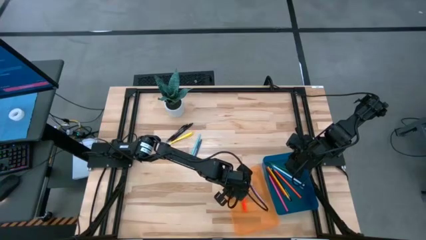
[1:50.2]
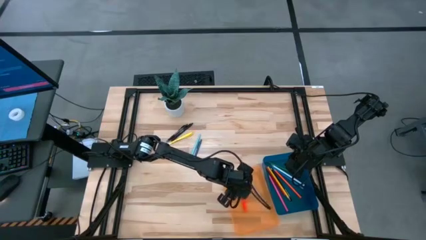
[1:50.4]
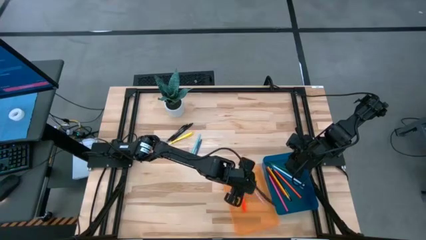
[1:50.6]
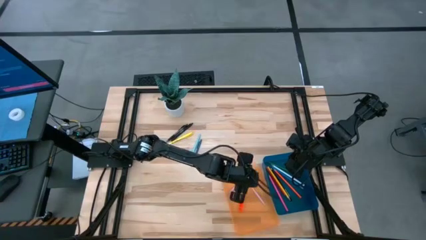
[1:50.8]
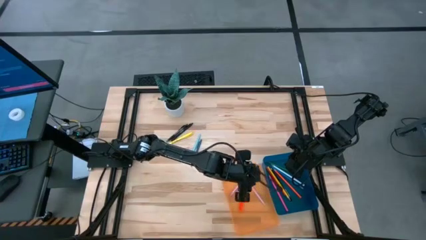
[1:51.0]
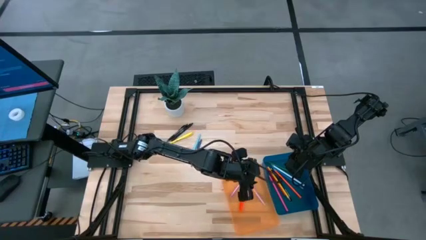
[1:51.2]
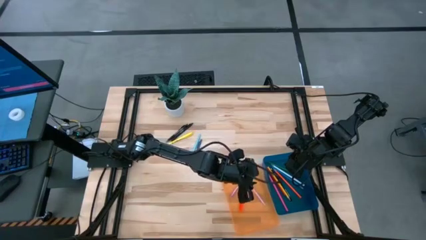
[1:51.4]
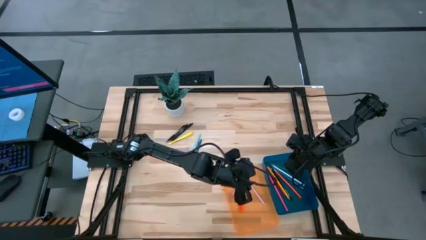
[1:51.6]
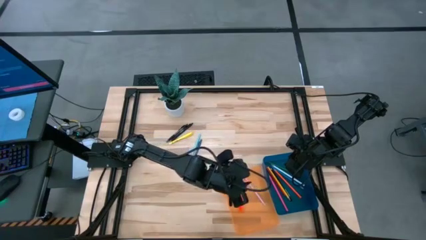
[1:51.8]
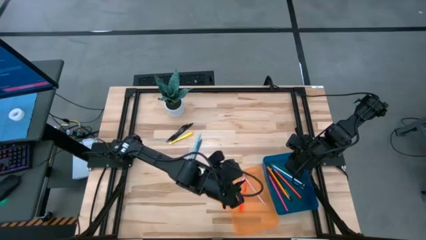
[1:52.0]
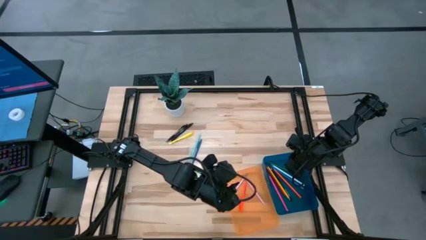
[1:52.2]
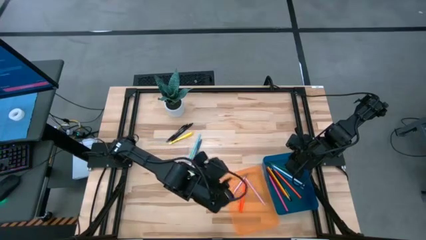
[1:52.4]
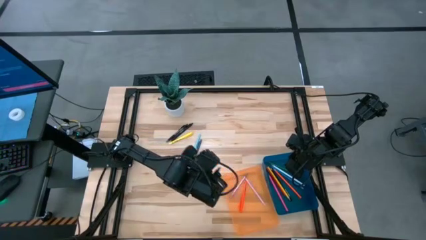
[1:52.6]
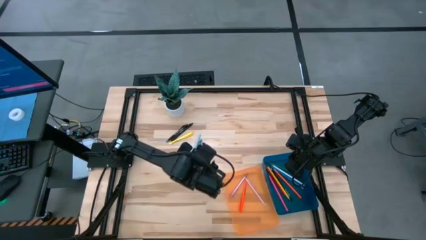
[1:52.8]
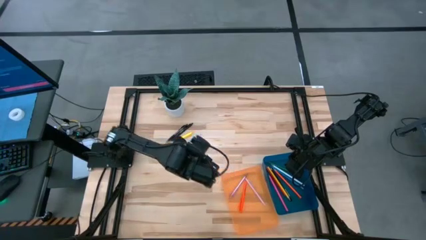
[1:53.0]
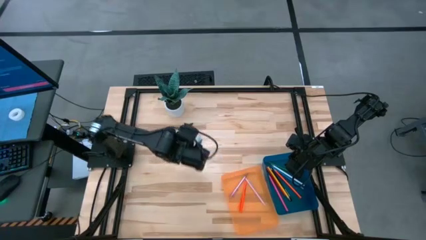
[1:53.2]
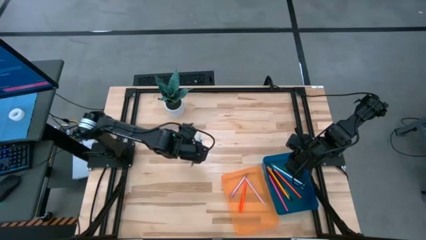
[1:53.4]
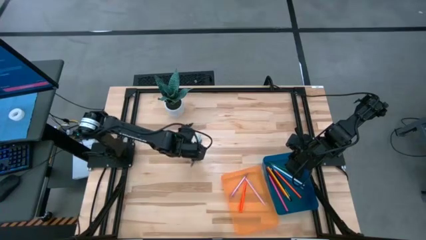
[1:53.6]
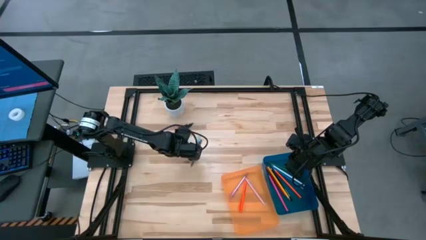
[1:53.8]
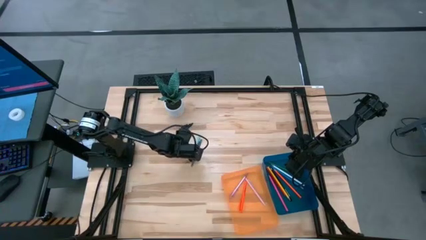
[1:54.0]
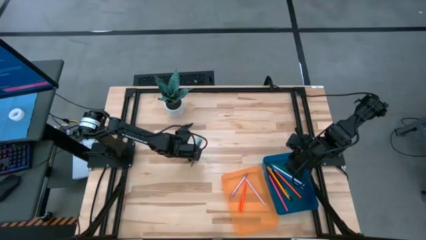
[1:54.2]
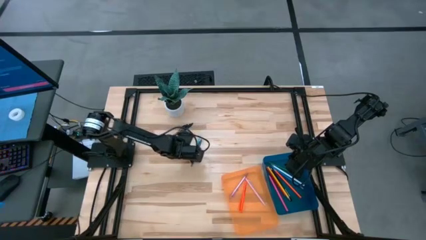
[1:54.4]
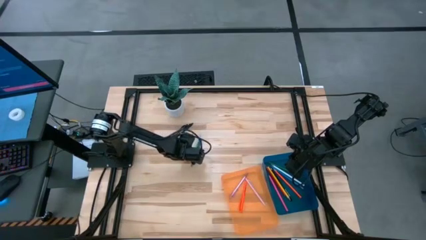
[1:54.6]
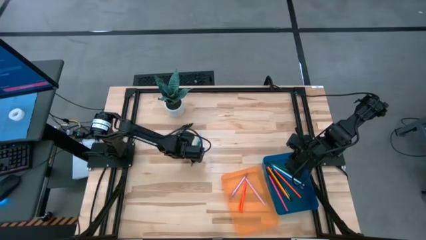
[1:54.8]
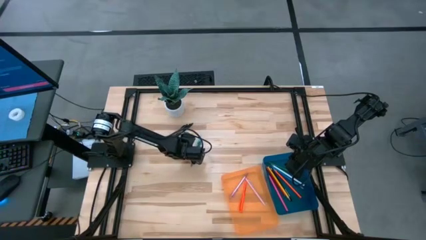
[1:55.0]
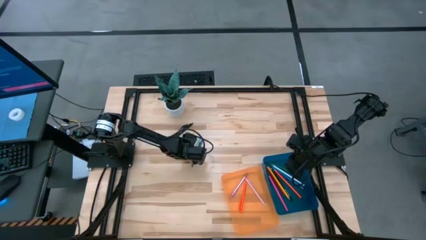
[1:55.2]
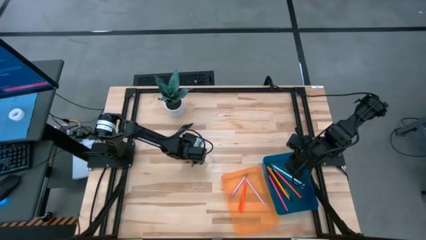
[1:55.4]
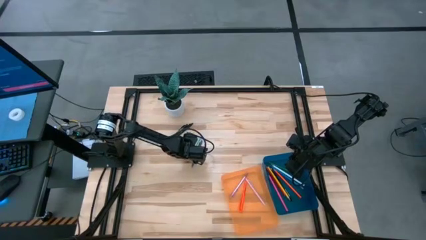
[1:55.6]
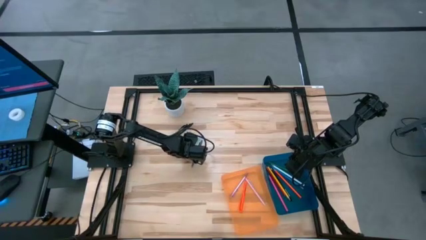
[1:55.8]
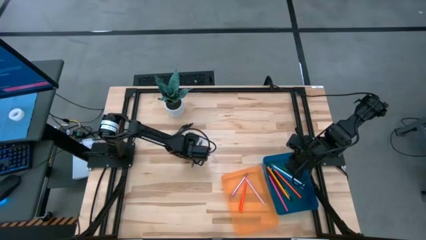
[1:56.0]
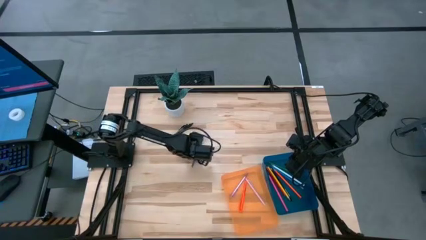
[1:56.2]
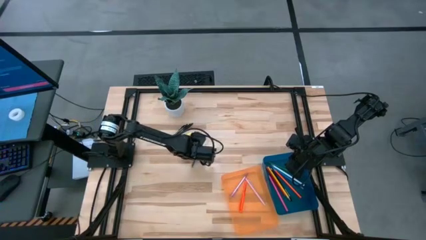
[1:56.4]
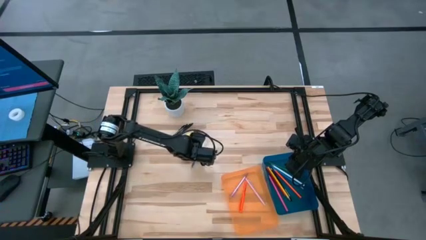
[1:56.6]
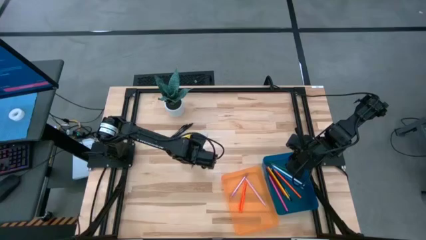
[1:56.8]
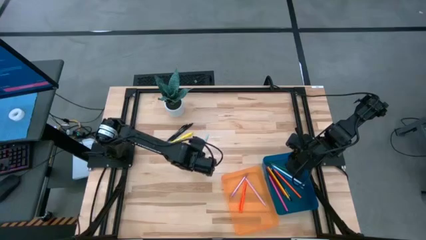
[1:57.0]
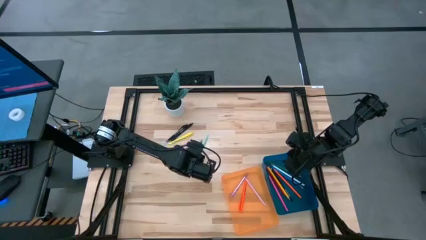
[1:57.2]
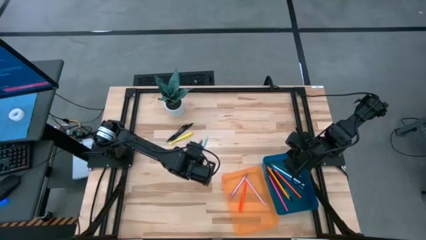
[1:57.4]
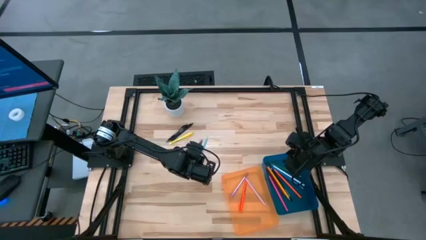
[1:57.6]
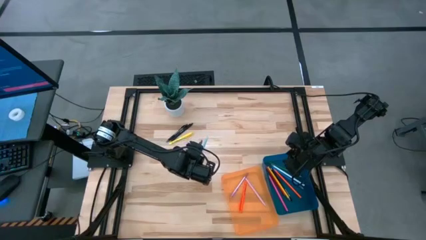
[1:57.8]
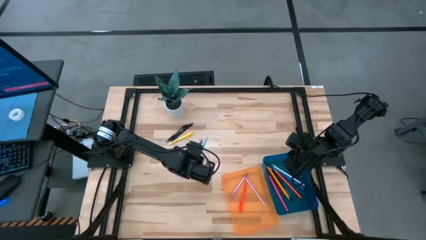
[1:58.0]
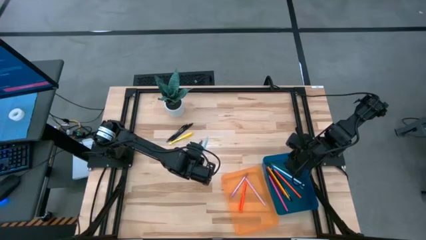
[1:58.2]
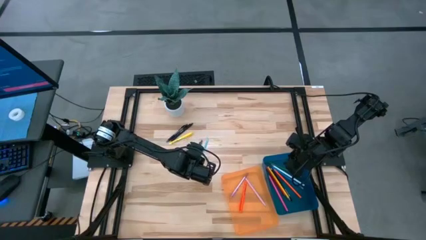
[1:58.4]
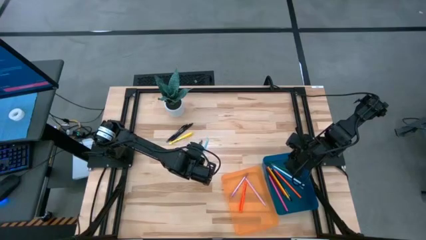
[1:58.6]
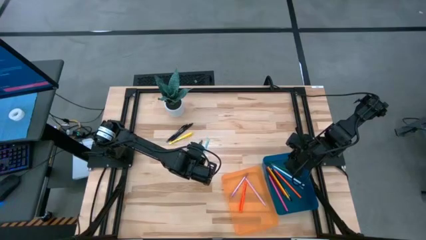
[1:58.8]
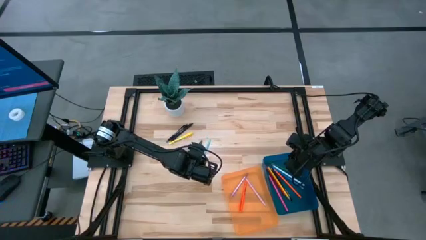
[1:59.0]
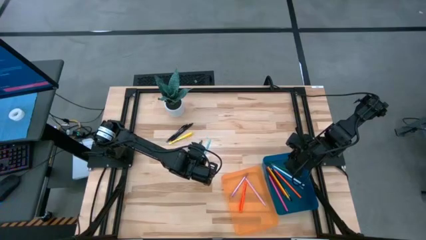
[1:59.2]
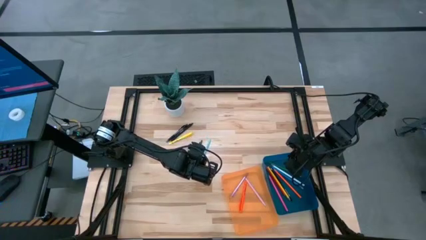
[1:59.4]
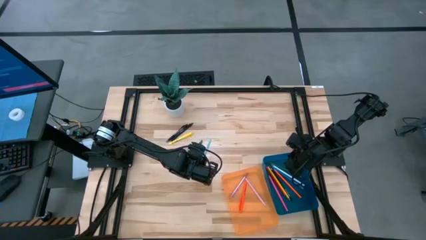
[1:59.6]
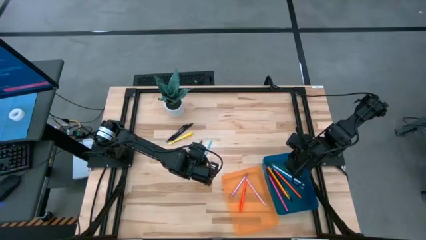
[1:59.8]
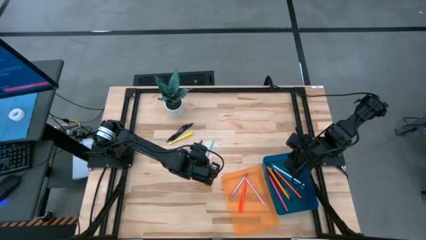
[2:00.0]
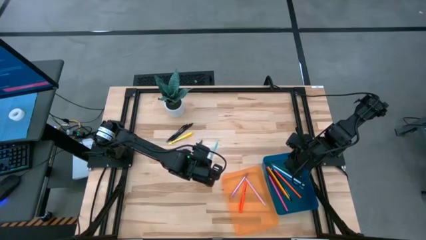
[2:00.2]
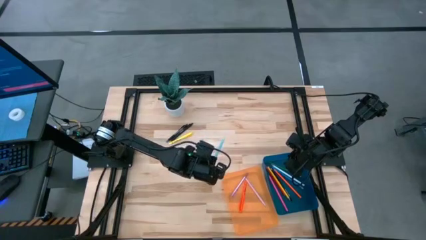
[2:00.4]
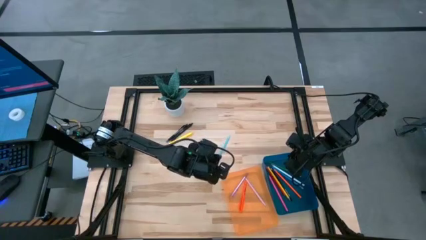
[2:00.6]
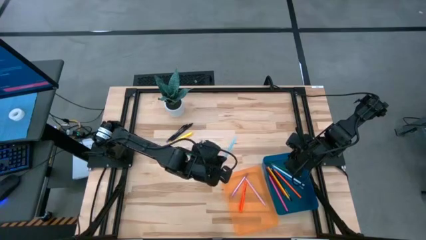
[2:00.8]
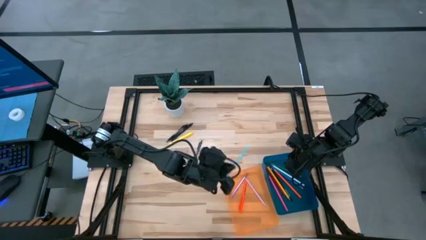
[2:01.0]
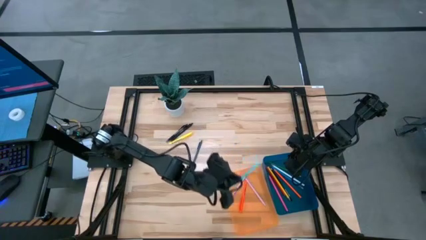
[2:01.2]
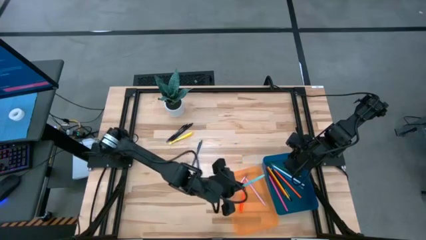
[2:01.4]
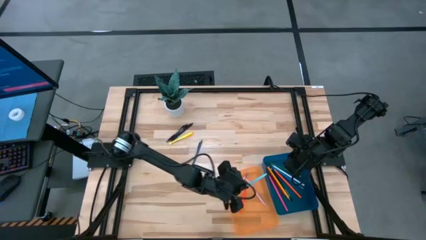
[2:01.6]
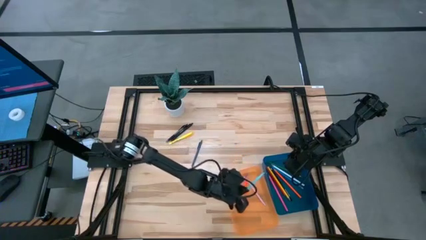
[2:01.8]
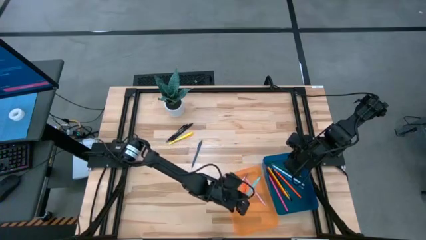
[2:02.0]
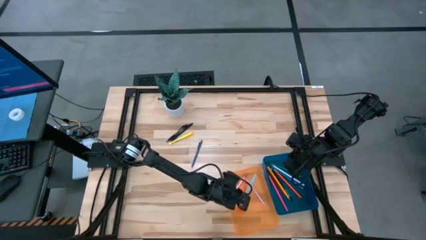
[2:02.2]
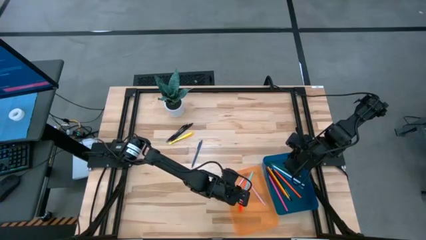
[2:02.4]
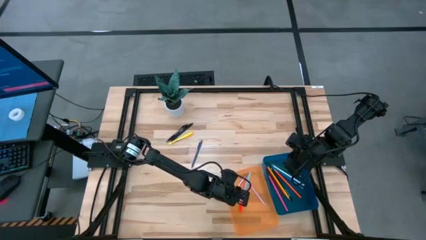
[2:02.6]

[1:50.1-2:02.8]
Task: Sort pens & pencils
Put the light blue pen into the orange bin

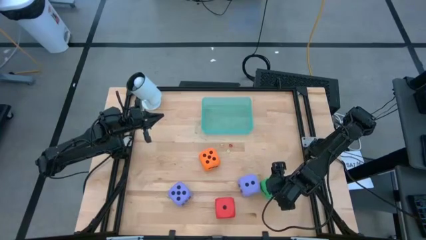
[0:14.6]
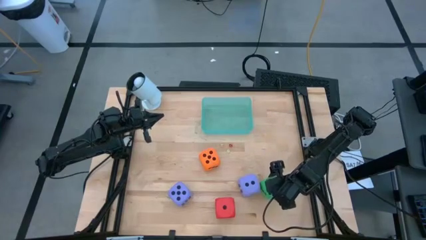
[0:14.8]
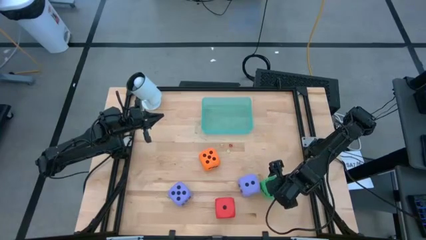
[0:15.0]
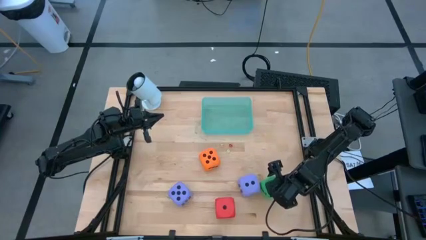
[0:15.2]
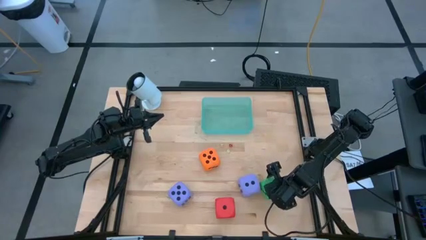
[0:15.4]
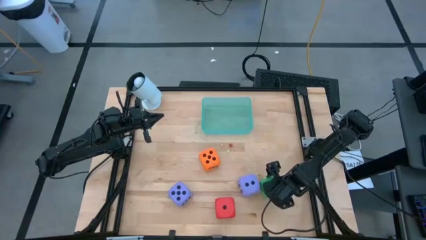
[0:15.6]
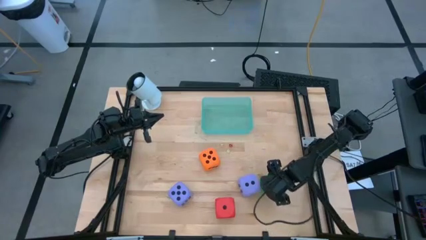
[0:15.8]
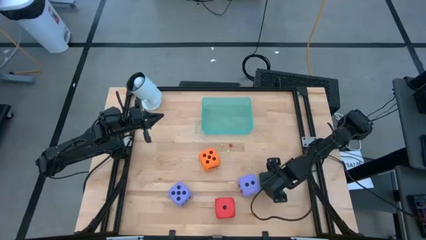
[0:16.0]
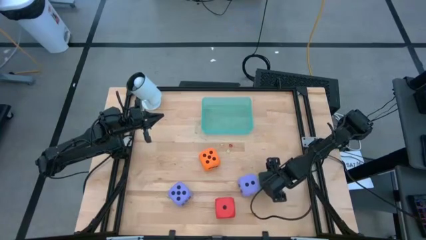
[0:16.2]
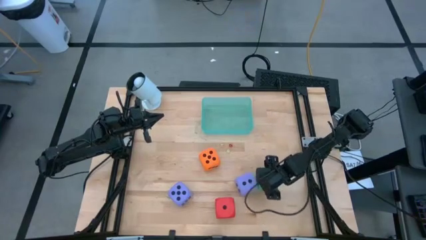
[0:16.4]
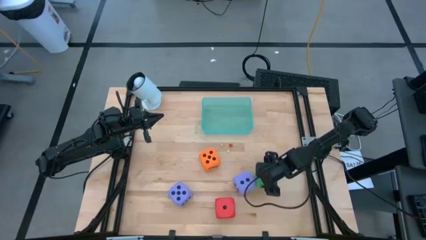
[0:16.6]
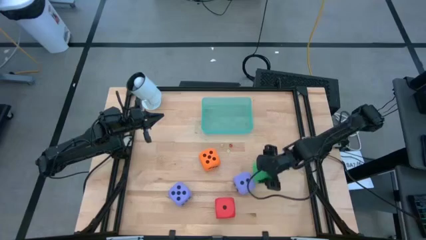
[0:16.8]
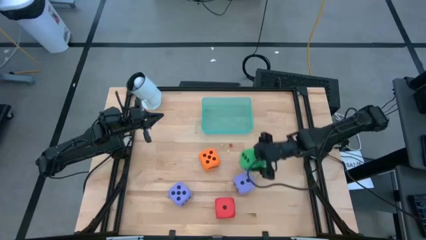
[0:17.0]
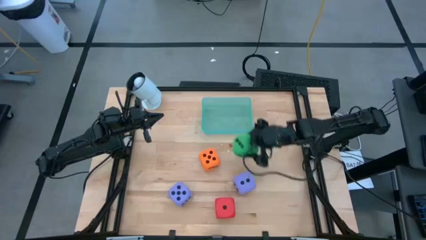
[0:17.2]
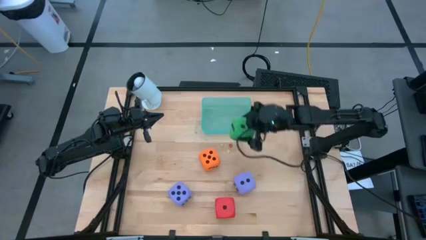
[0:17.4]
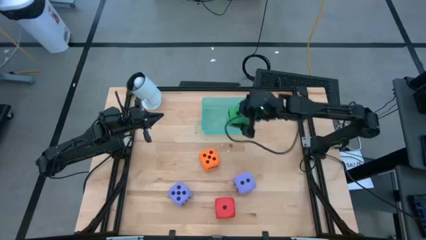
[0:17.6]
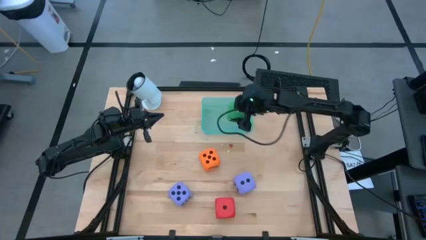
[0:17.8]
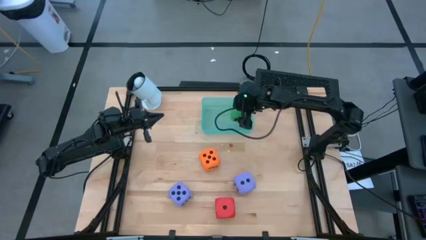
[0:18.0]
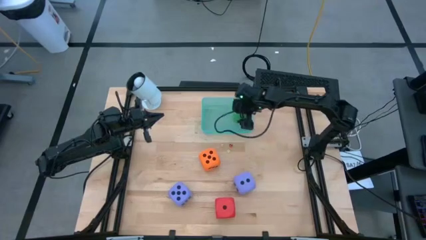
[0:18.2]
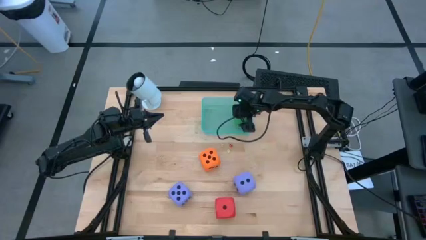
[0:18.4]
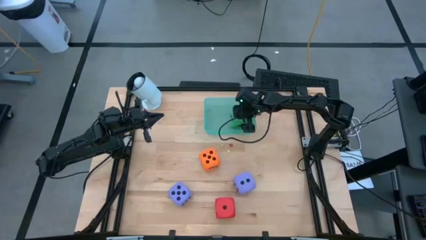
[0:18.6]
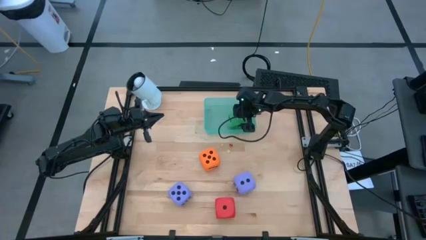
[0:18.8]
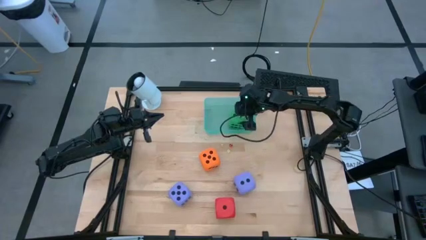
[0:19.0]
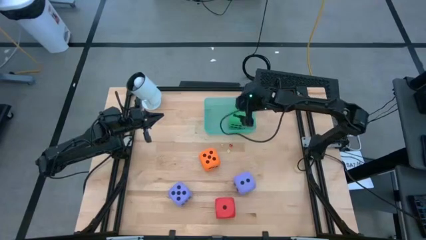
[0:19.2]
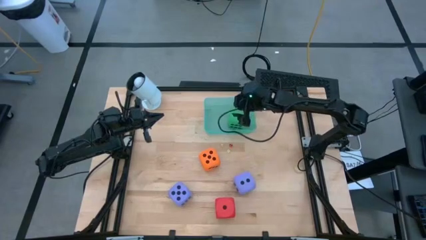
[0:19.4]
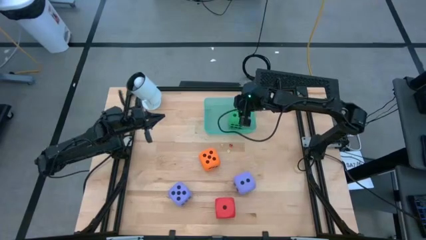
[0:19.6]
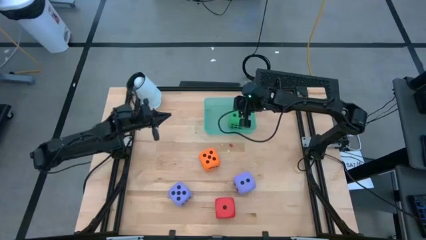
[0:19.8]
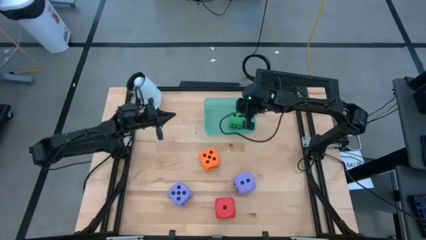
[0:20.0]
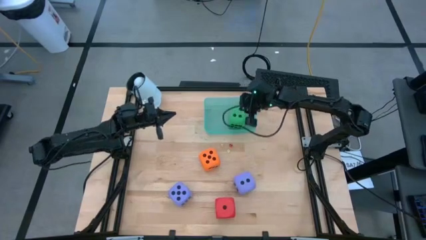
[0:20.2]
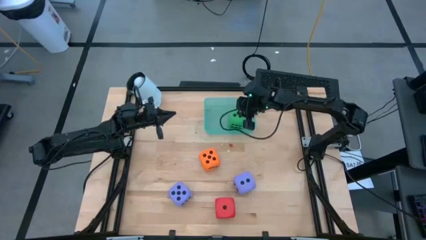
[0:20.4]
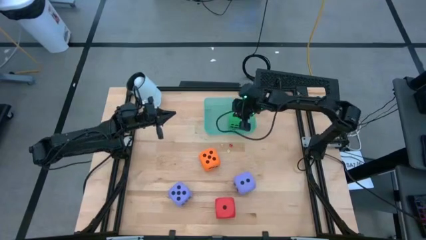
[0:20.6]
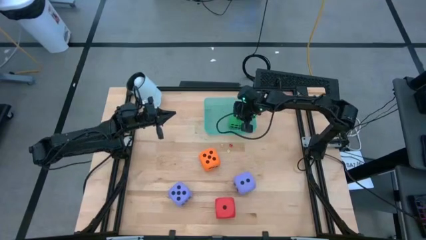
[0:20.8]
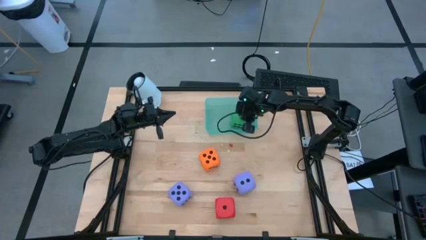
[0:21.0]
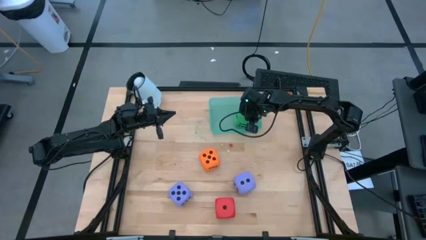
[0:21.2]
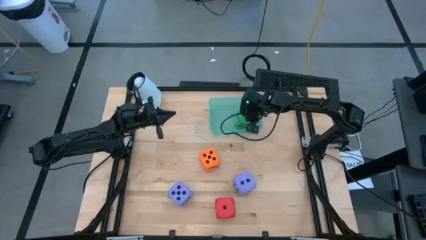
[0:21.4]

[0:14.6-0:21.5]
Task: Pick & Place Dice
Put the large green dice into the light blue bin
